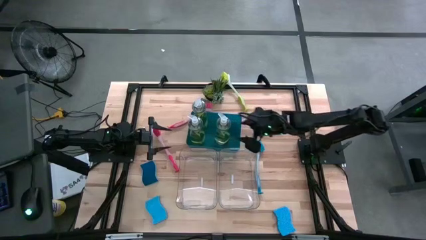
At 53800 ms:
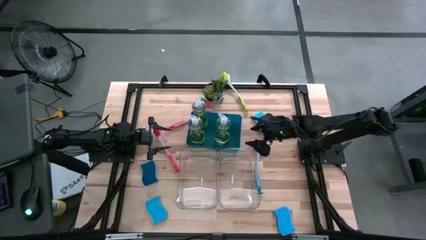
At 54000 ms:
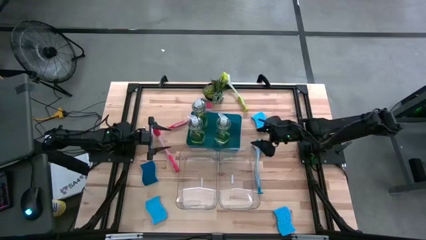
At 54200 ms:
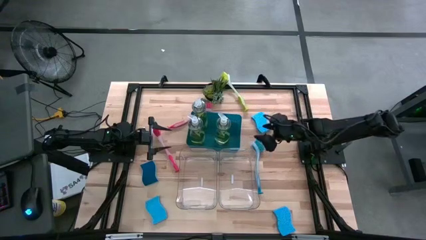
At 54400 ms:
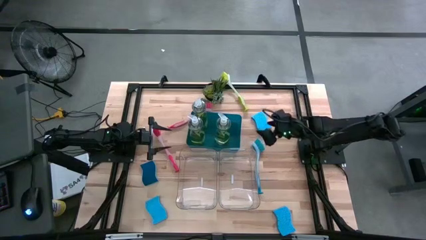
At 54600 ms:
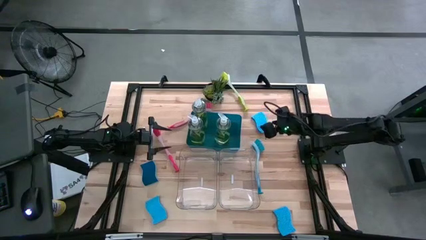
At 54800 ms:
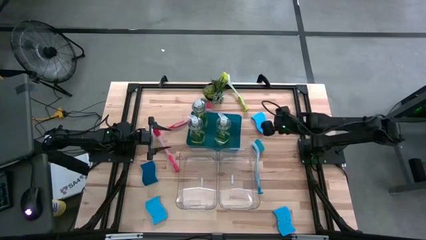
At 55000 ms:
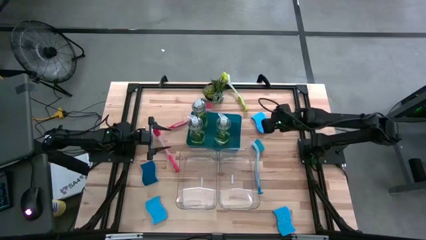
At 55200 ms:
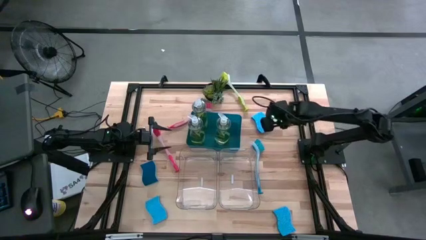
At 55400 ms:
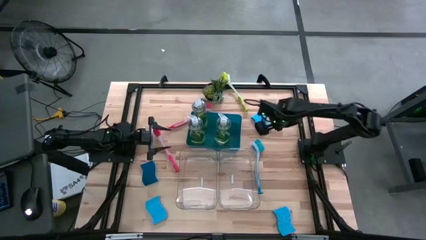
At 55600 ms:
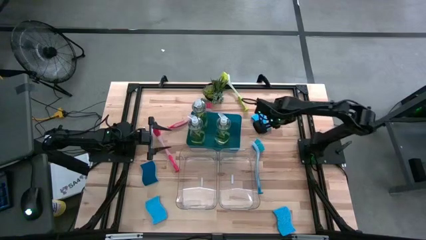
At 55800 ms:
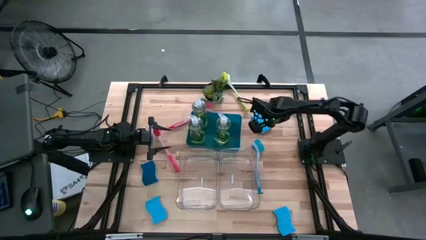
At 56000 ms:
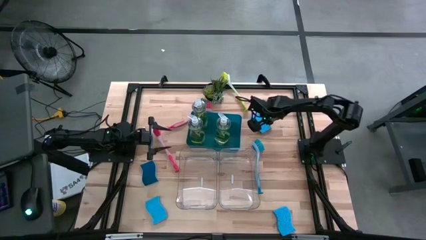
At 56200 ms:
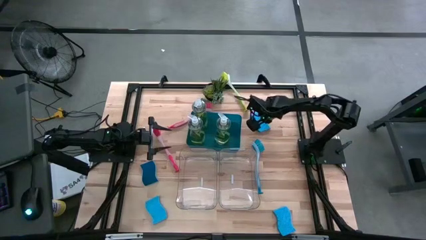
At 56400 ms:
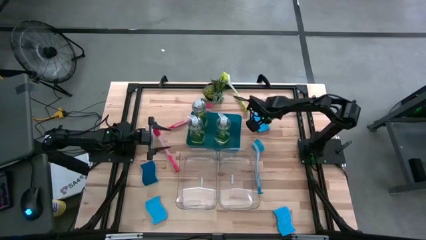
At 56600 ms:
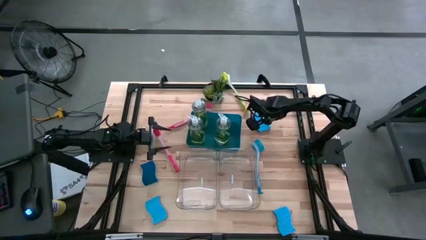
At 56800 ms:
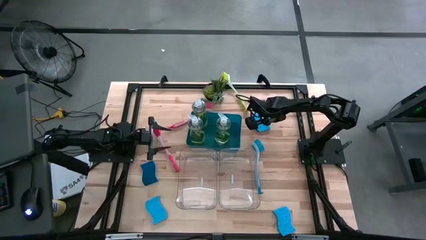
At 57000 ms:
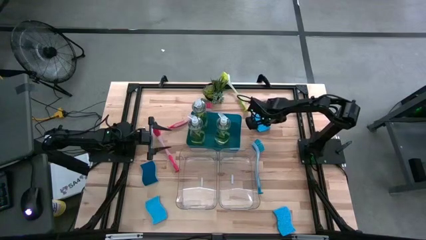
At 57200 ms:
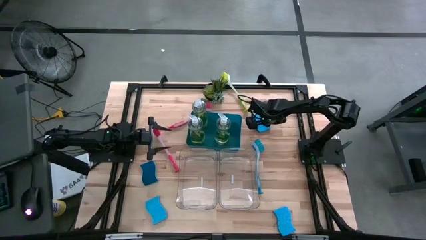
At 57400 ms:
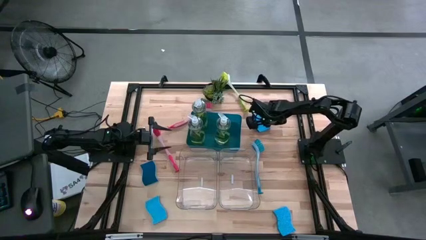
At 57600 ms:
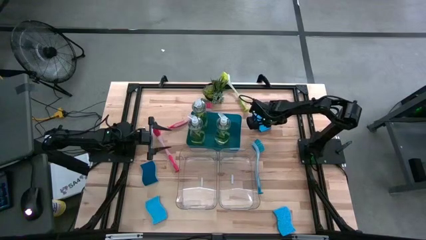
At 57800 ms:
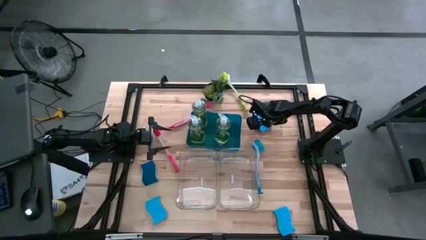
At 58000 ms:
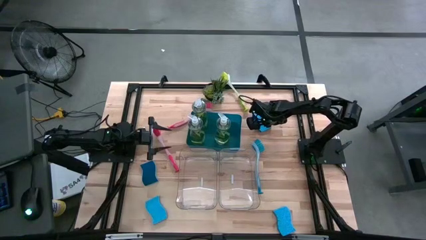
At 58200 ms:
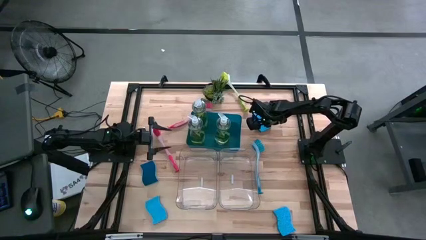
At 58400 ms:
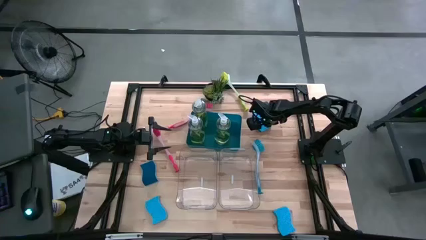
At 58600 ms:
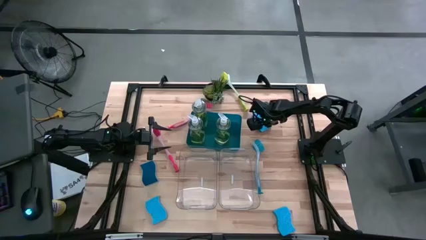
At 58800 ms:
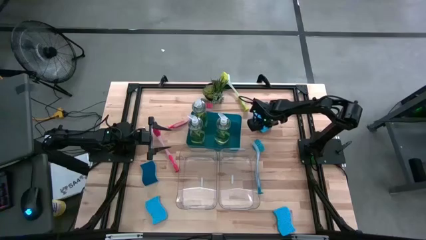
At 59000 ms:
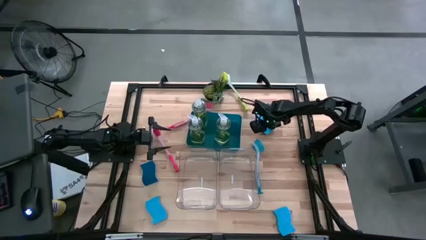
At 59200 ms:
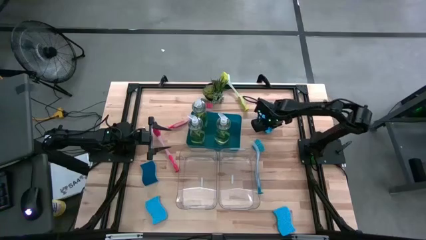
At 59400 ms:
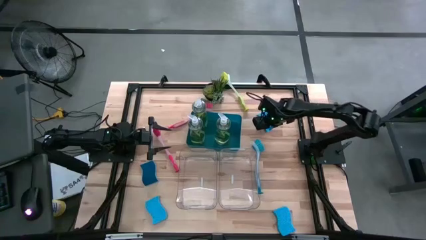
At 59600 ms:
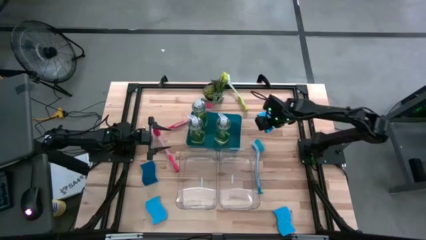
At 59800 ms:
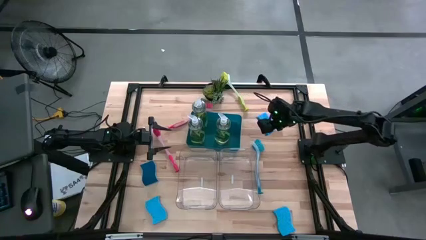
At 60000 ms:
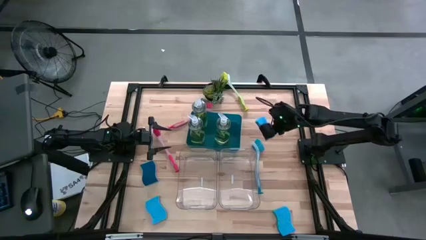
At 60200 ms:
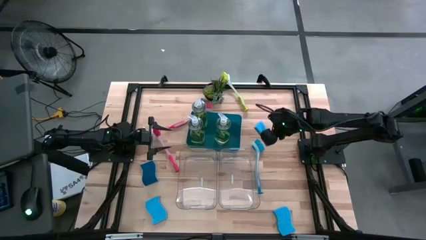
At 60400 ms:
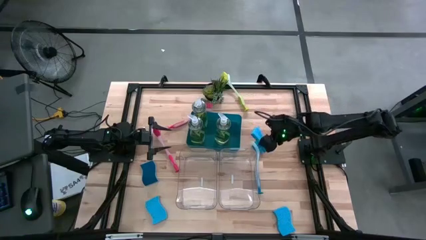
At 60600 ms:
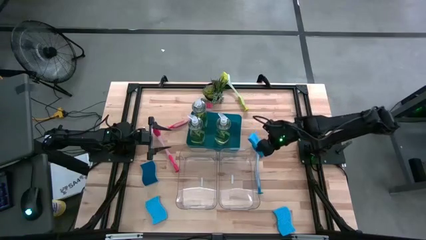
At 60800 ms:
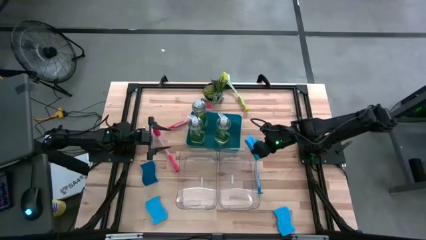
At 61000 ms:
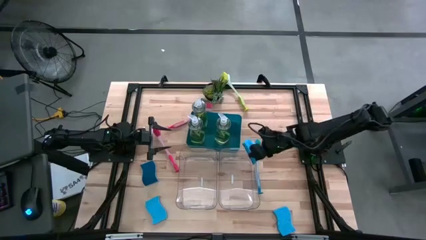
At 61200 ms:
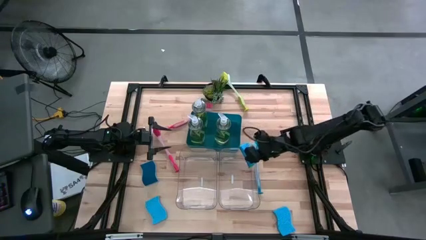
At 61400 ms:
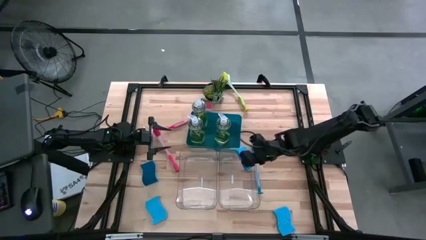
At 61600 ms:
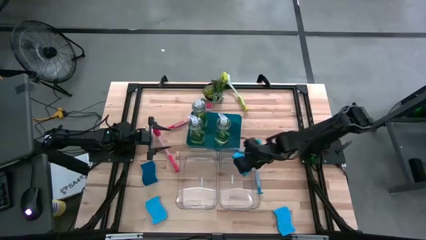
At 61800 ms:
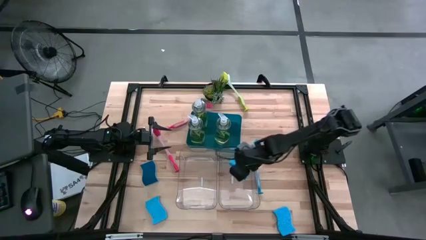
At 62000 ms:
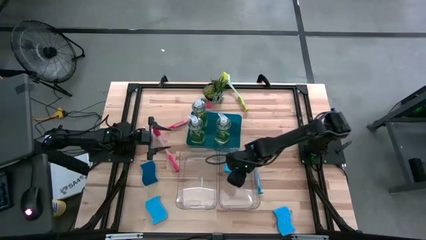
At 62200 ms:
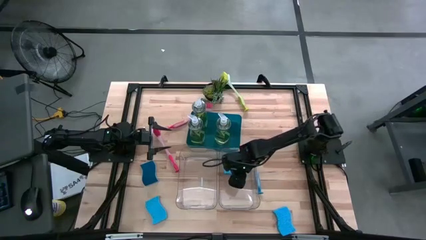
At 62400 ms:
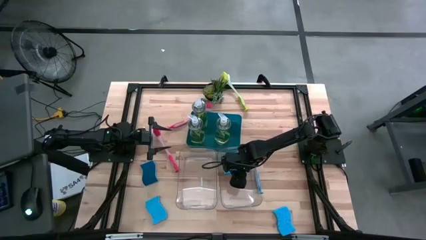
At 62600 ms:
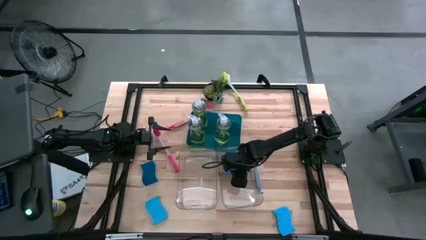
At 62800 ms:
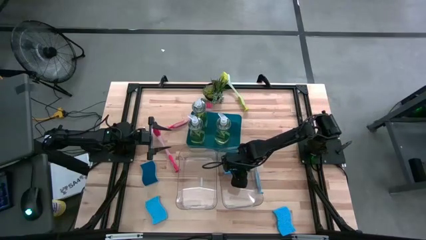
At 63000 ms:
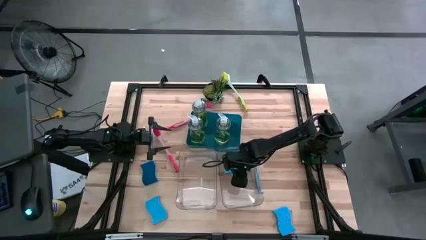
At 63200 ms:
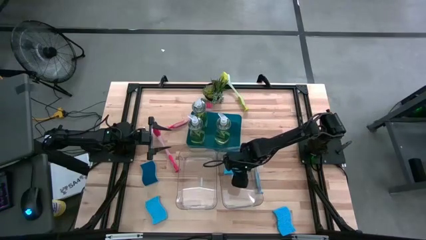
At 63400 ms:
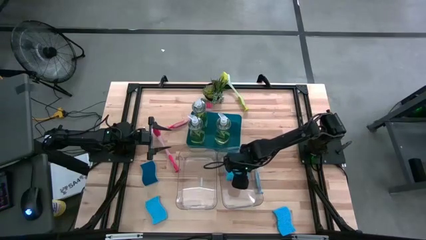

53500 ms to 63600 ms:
Task: Pick & Place Kitchen Sink Supplies
Put the blue sponge into the right transparent bin
